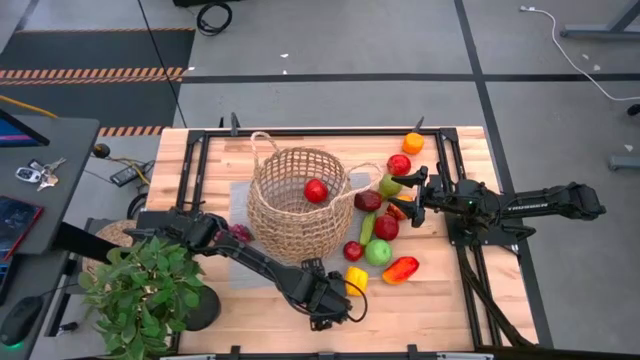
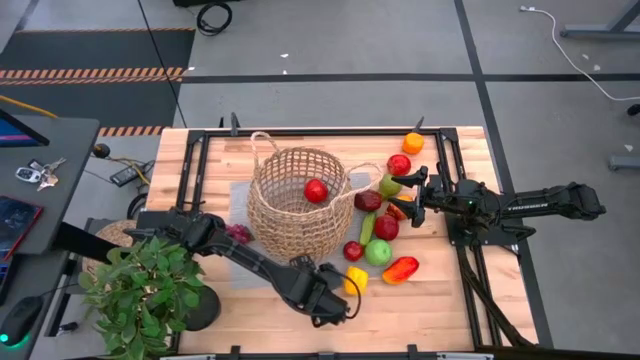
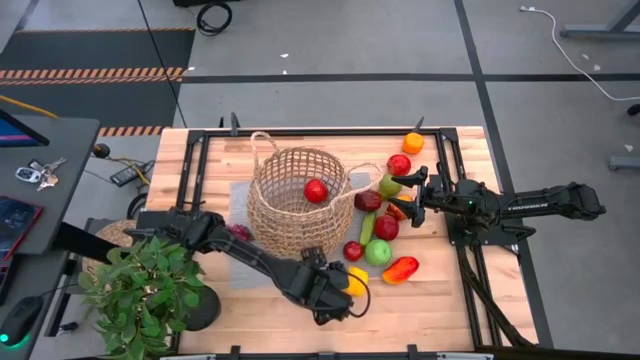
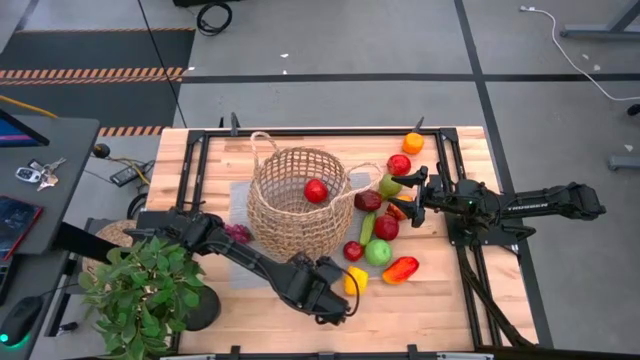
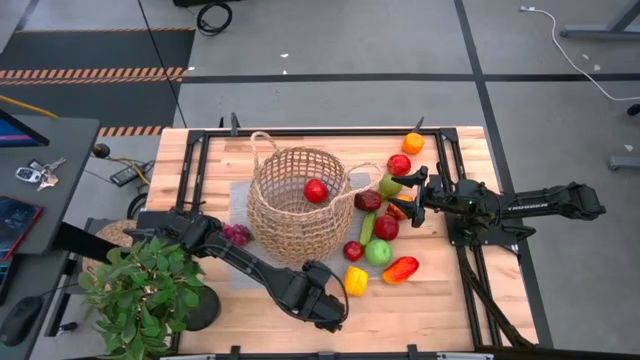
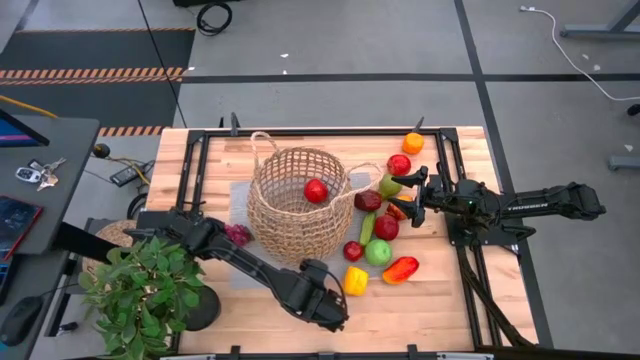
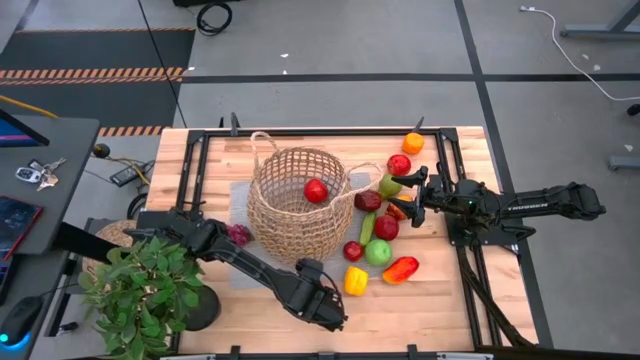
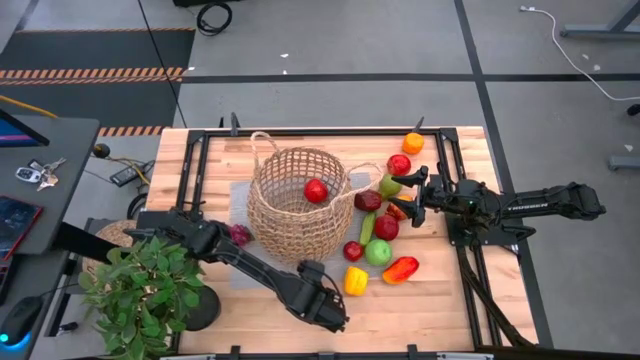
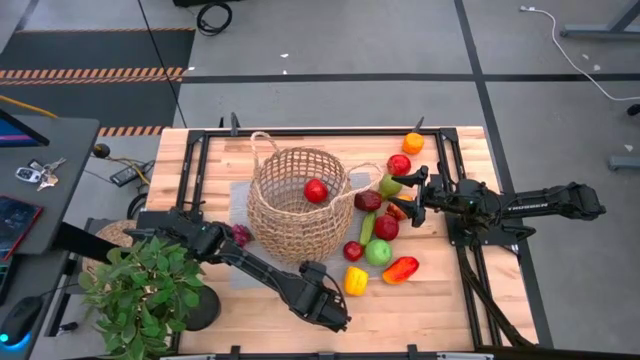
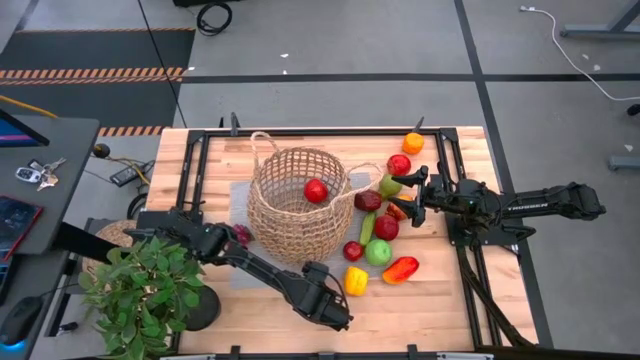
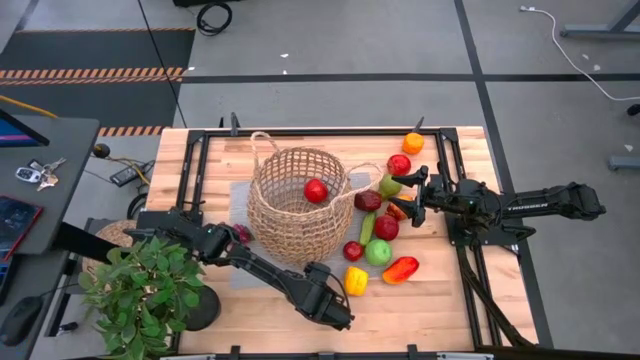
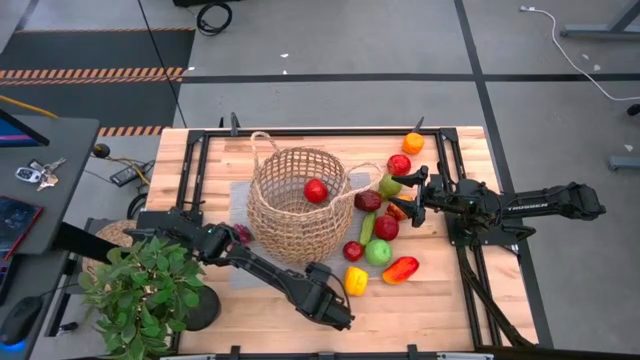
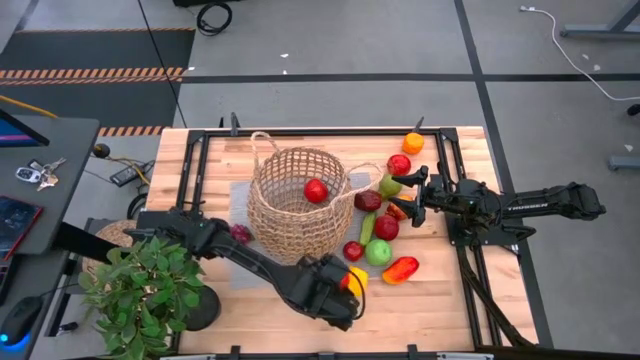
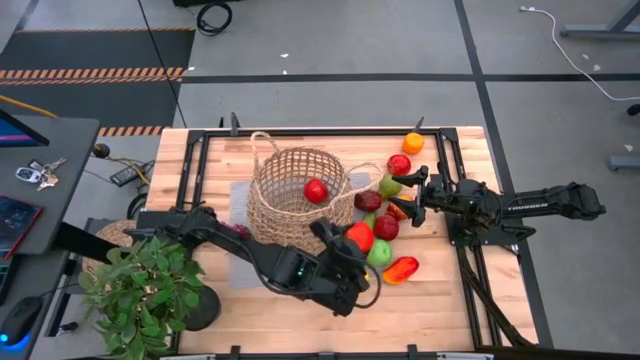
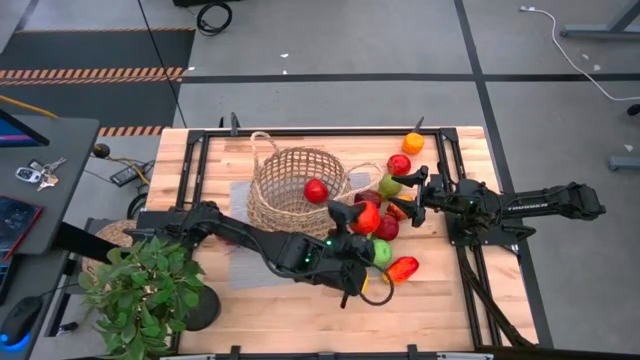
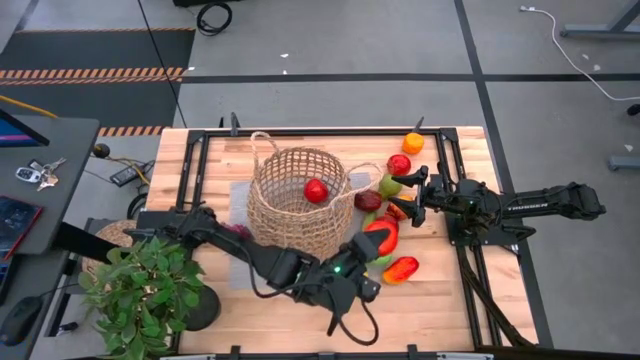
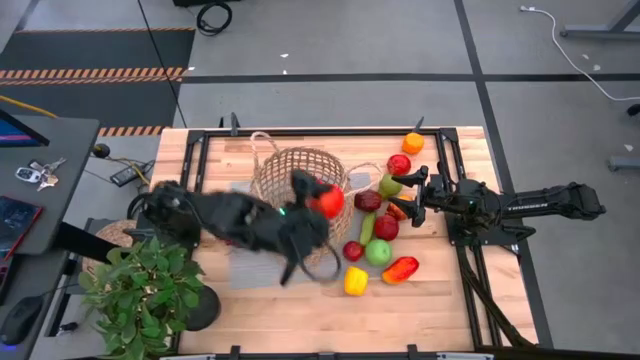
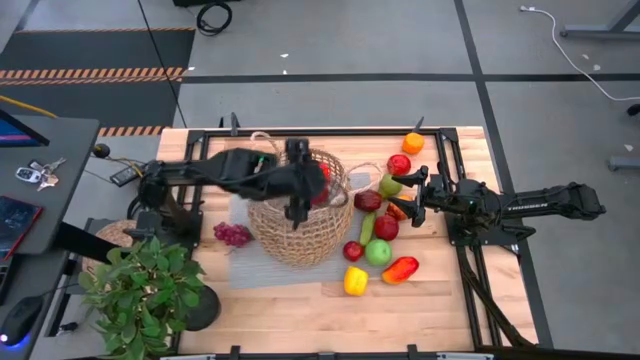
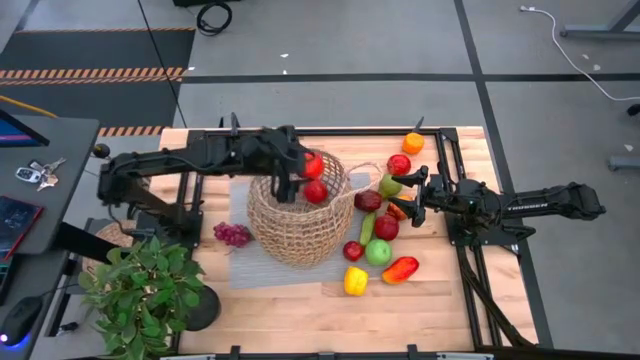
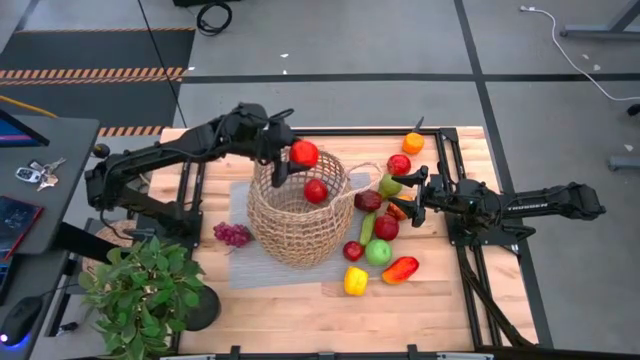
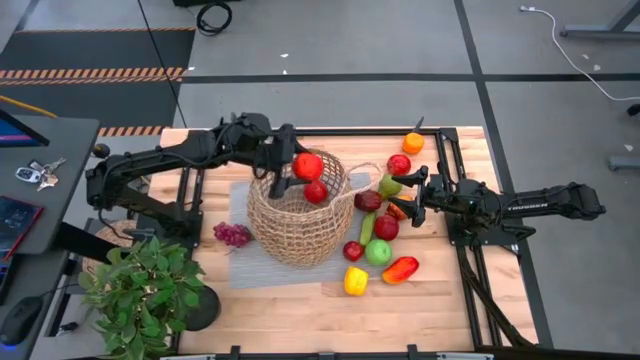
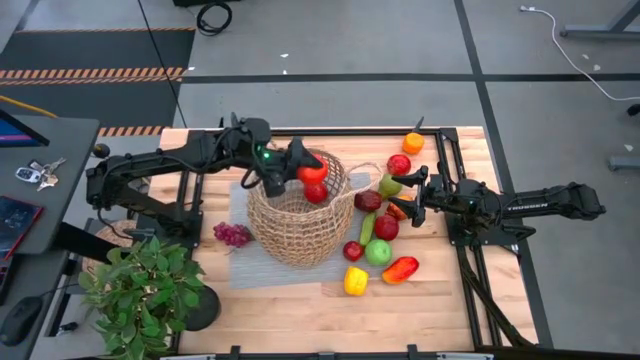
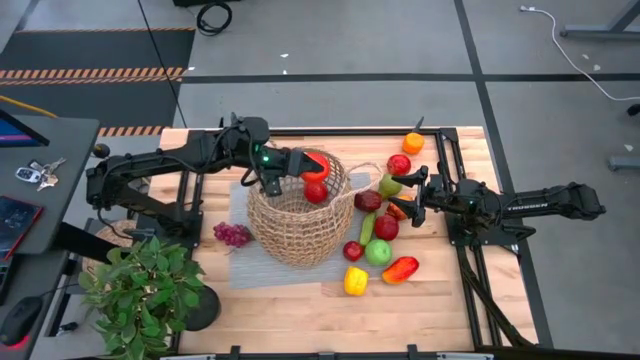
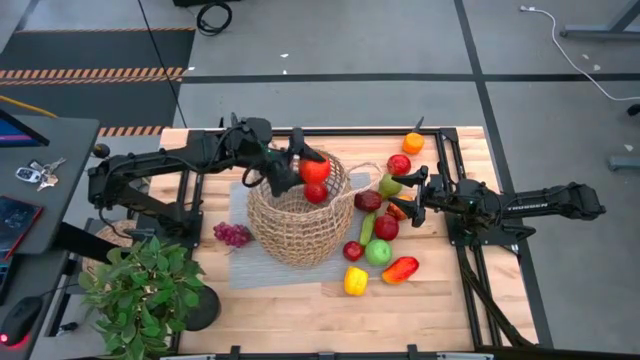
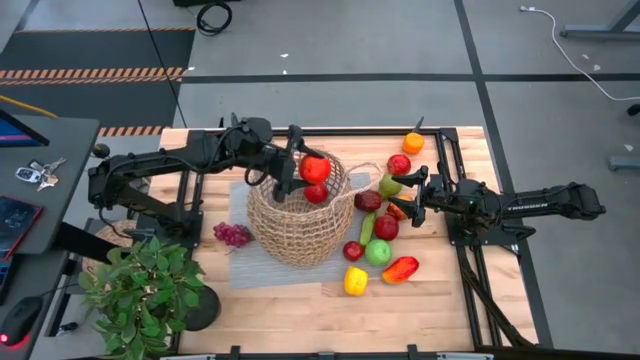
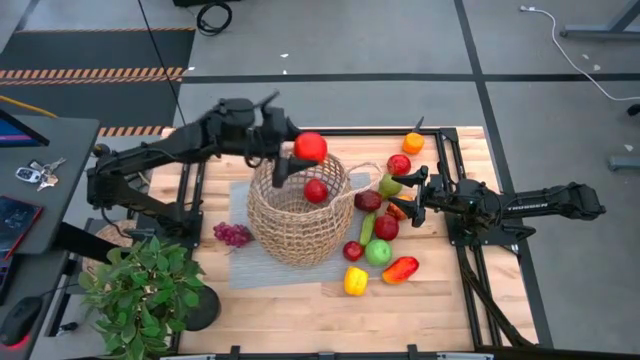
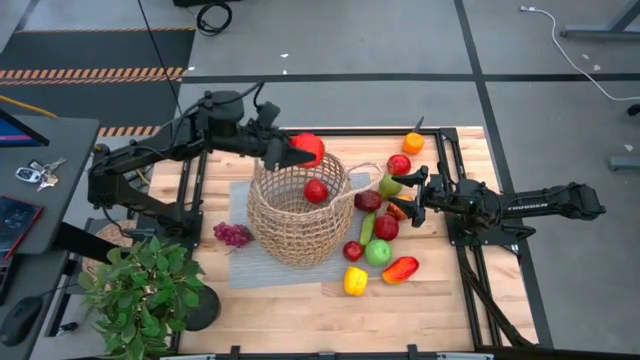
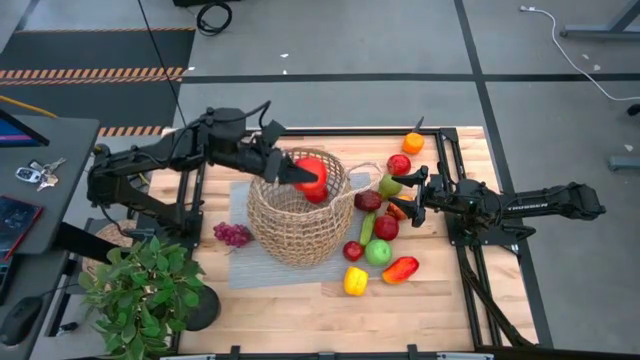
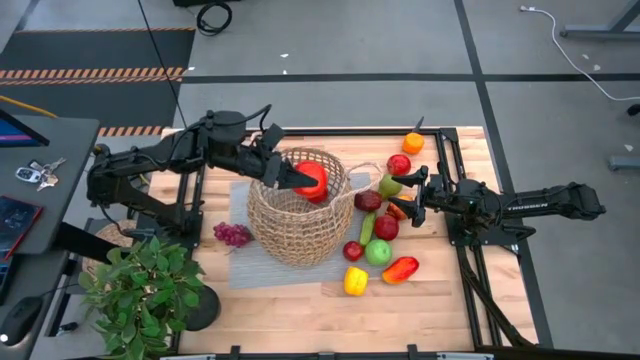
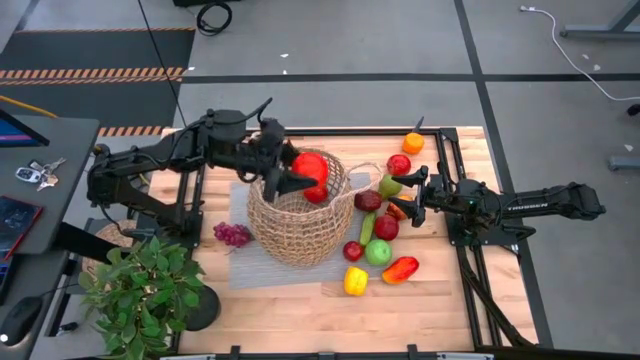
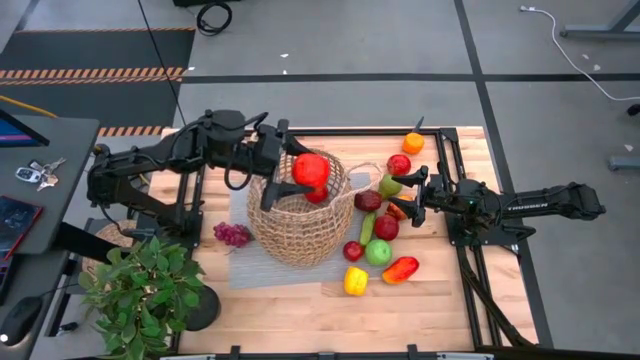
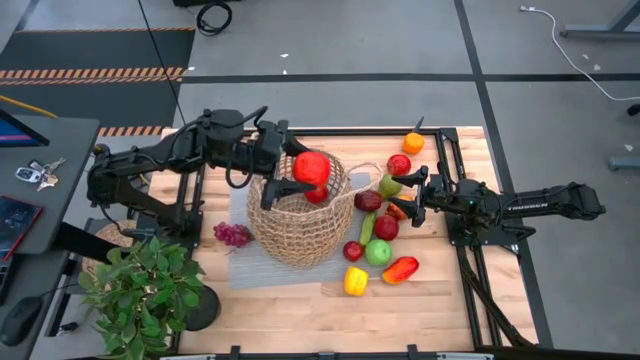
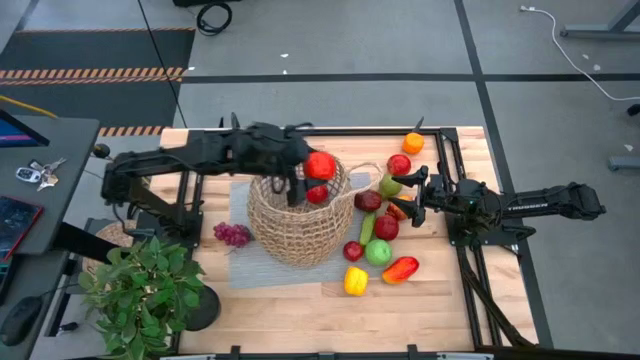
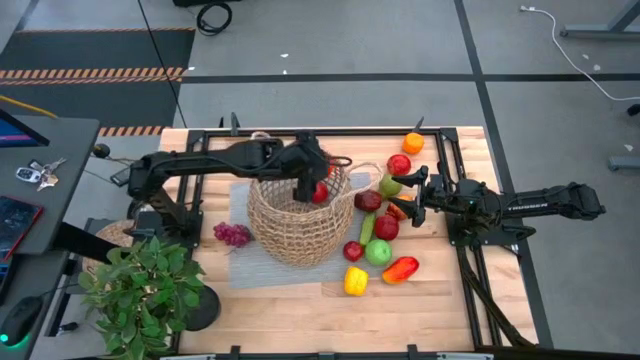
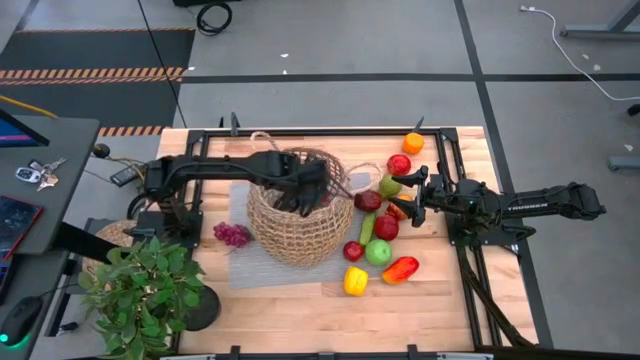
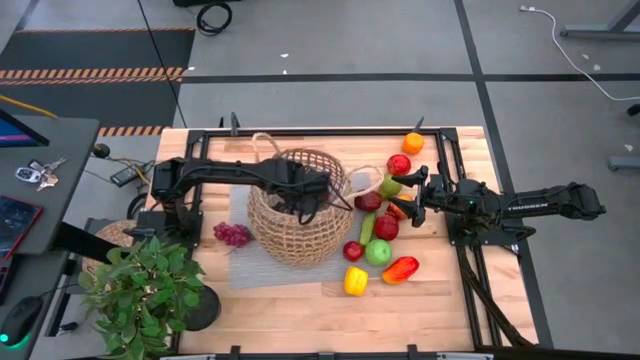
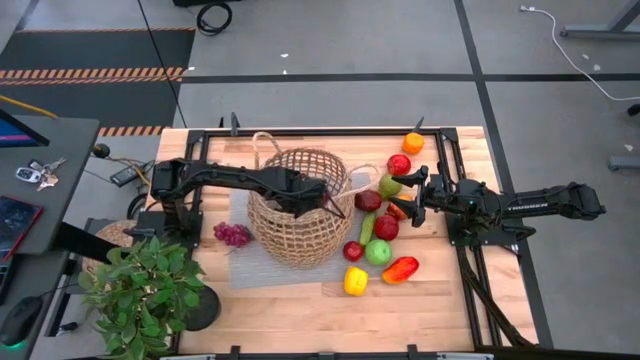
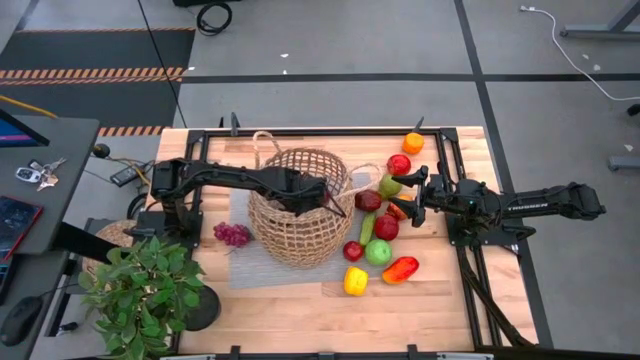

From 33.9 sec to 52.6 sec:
Task: Build produce basket
Put the red apple into the brown basket

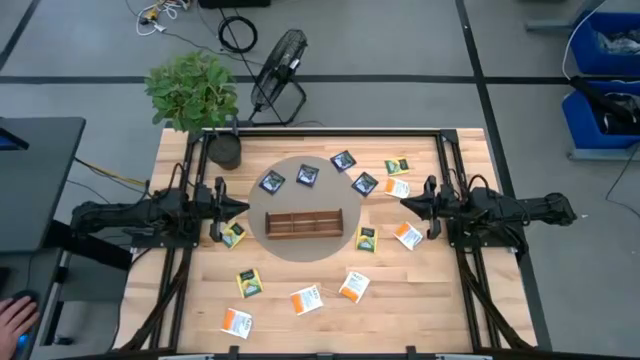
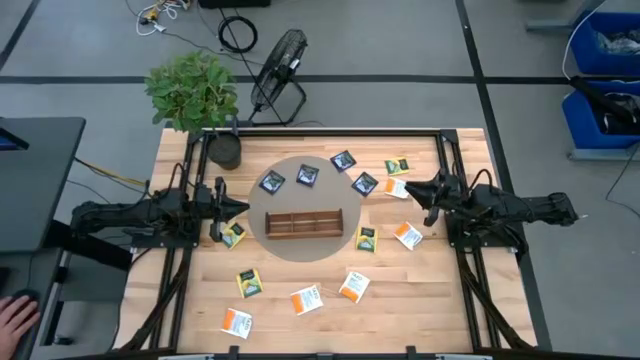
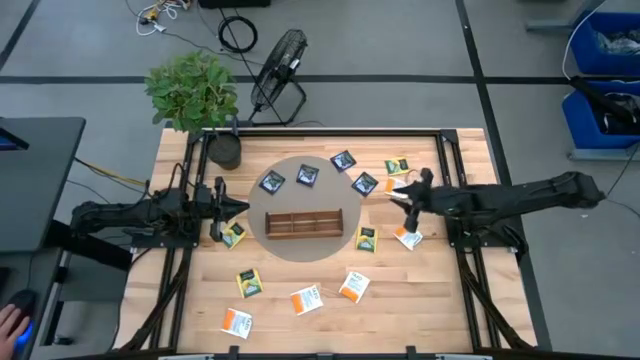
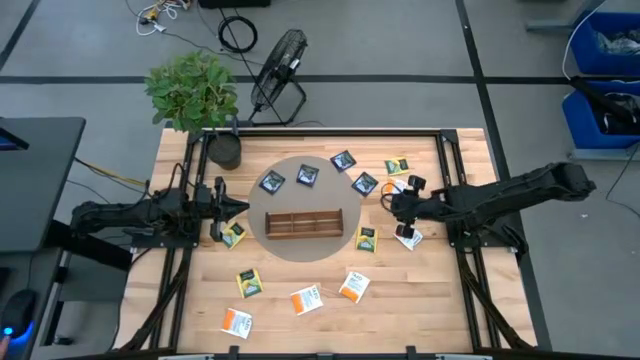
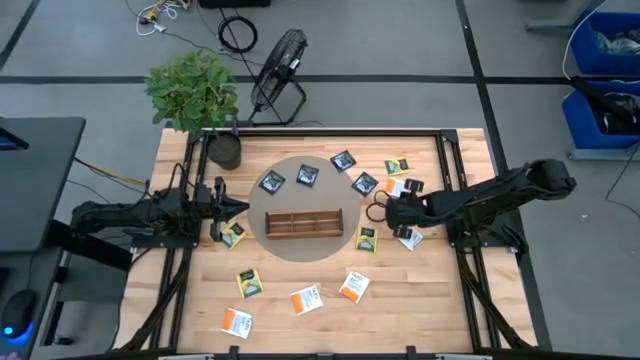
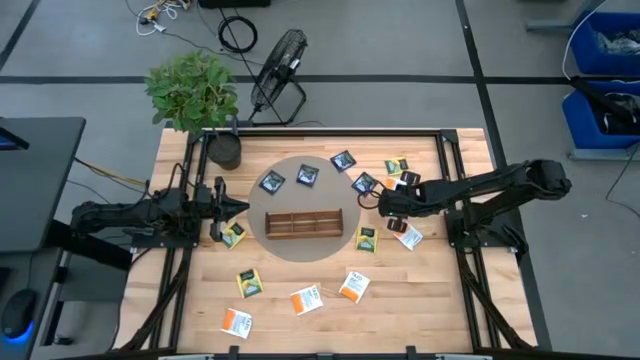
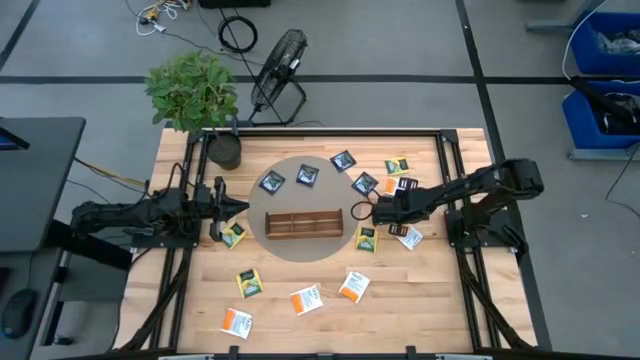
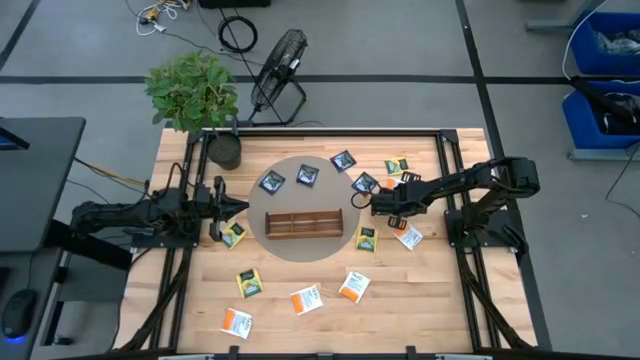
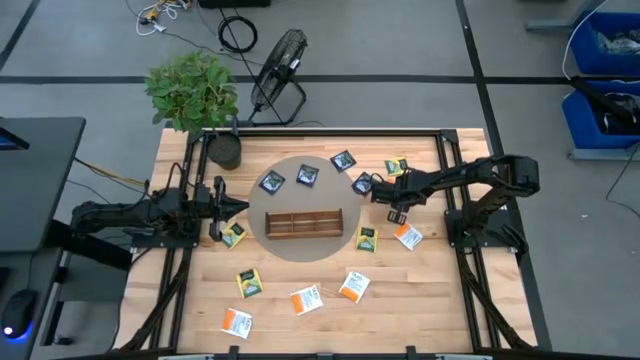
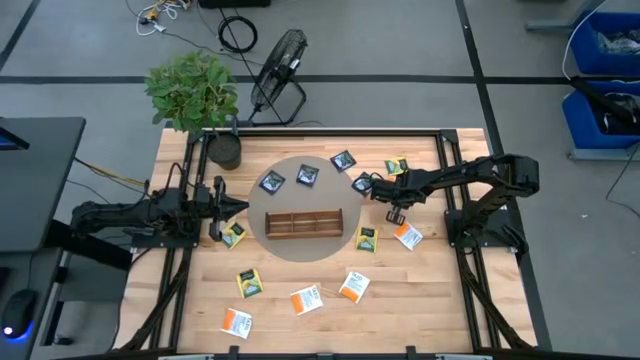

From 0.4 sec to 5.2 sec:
Task: Pick & Place Tea
Put the orange tea bag into the left compartment of the wooden organizer
